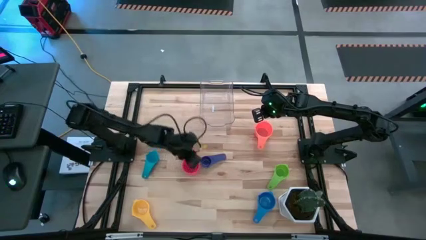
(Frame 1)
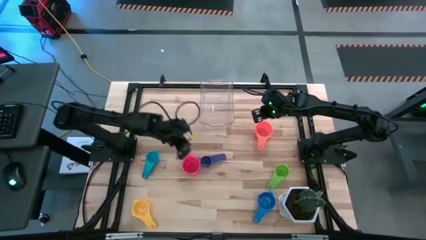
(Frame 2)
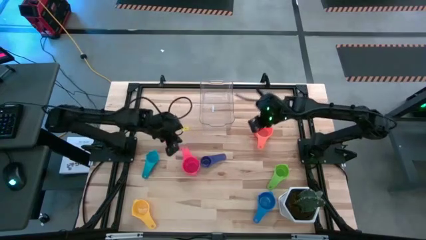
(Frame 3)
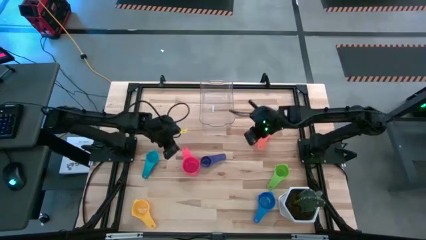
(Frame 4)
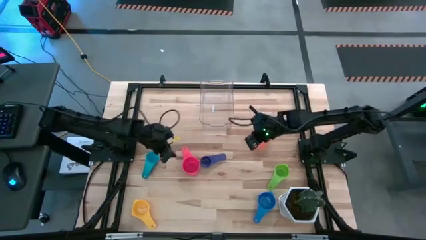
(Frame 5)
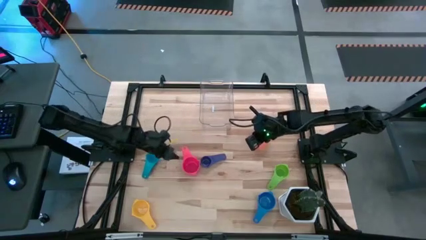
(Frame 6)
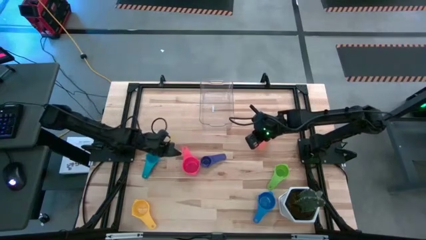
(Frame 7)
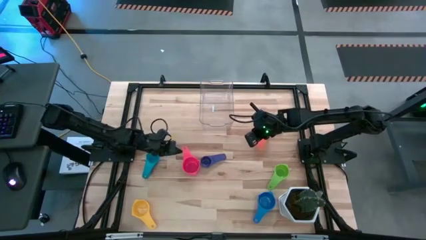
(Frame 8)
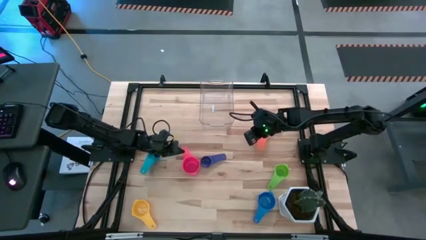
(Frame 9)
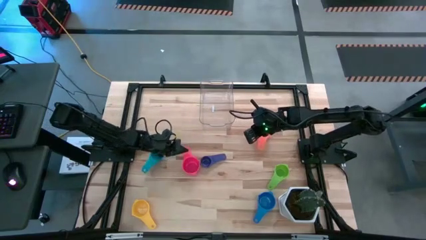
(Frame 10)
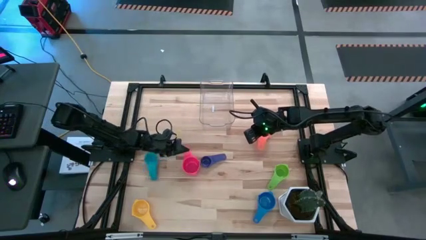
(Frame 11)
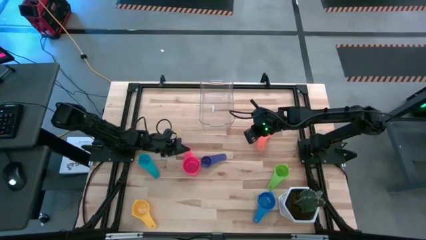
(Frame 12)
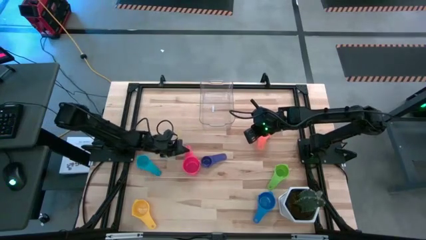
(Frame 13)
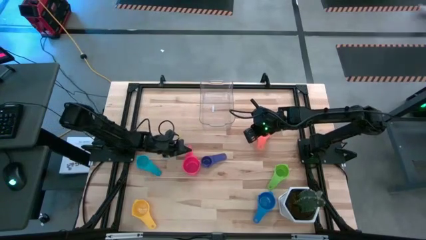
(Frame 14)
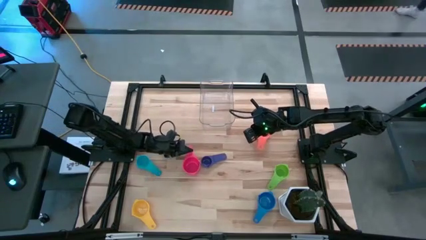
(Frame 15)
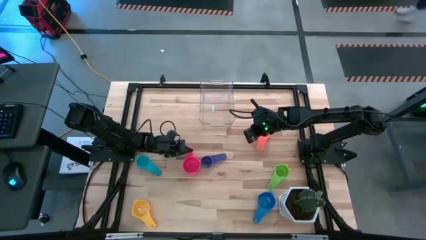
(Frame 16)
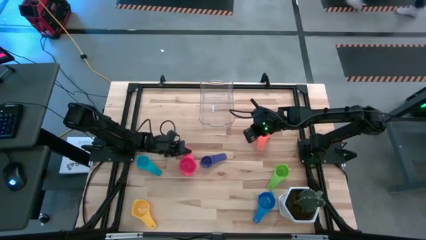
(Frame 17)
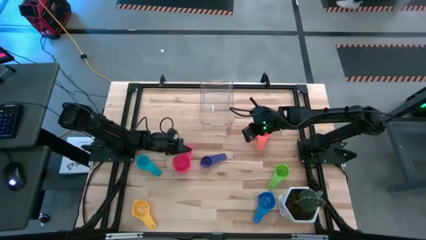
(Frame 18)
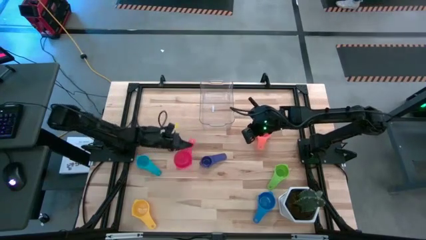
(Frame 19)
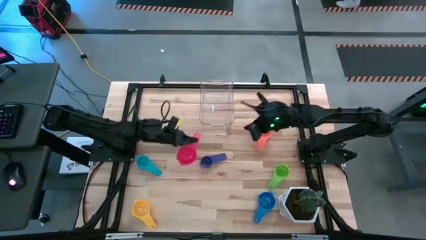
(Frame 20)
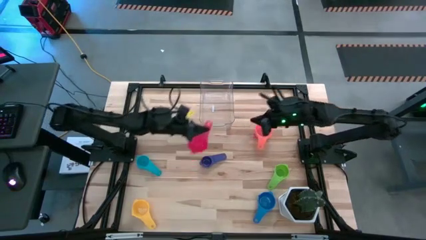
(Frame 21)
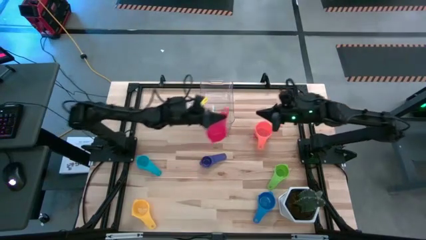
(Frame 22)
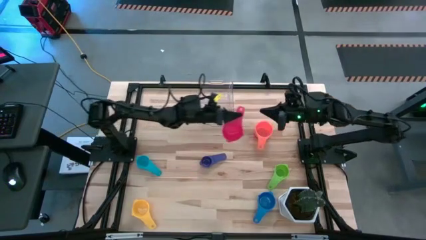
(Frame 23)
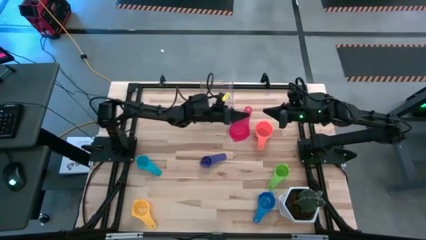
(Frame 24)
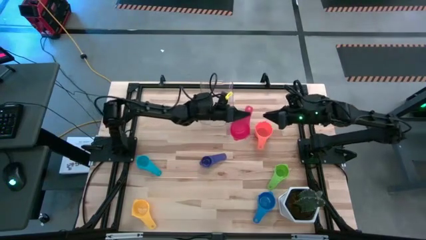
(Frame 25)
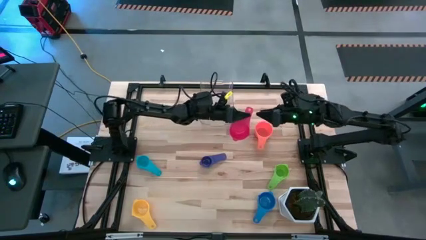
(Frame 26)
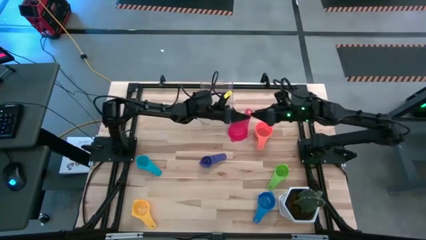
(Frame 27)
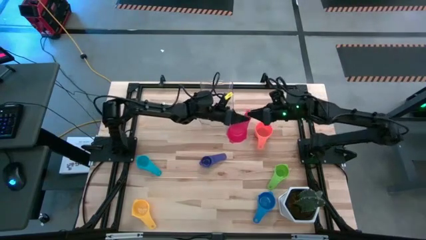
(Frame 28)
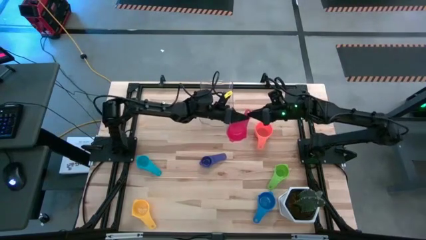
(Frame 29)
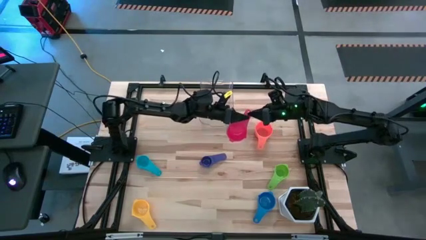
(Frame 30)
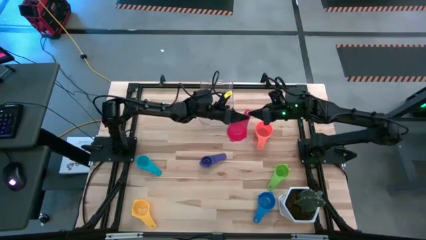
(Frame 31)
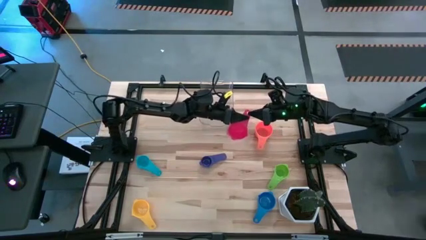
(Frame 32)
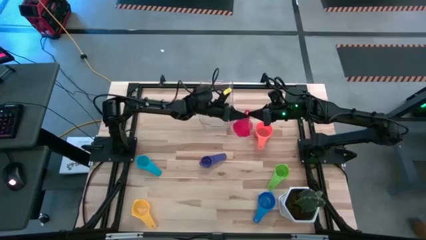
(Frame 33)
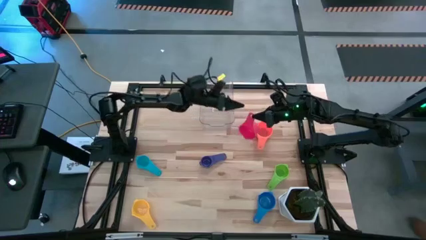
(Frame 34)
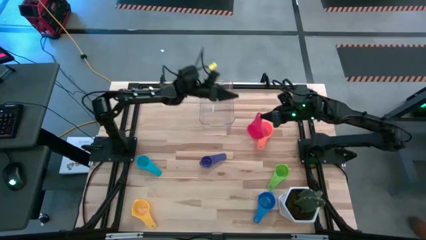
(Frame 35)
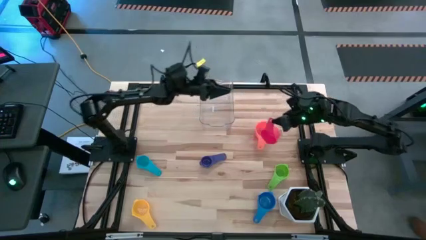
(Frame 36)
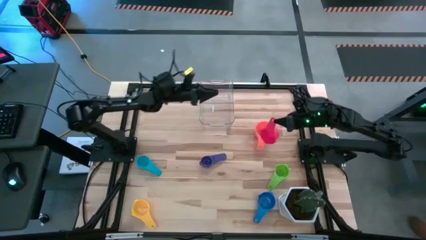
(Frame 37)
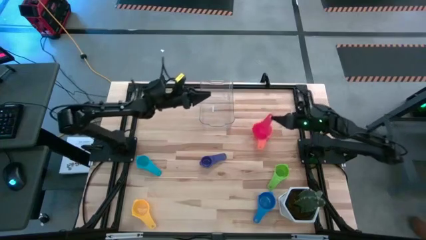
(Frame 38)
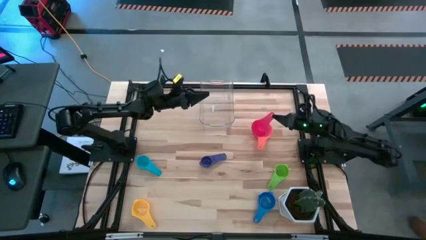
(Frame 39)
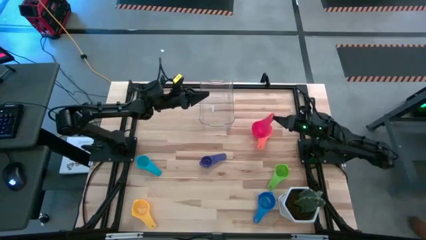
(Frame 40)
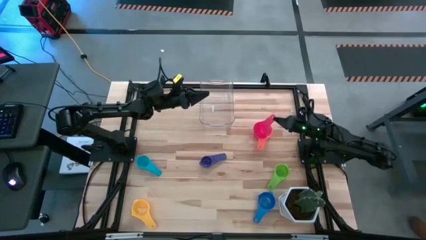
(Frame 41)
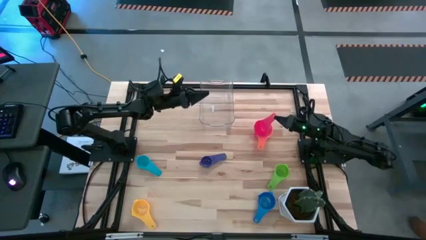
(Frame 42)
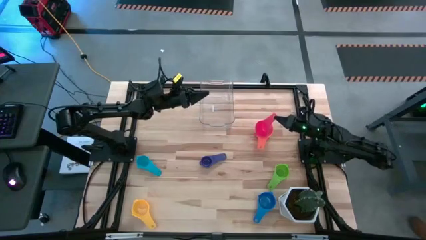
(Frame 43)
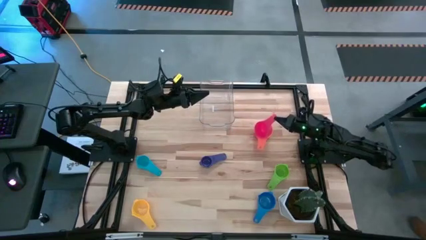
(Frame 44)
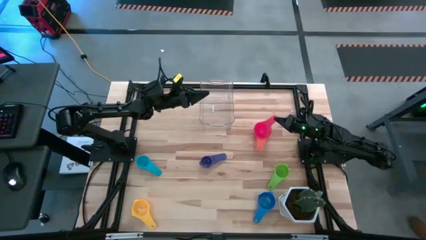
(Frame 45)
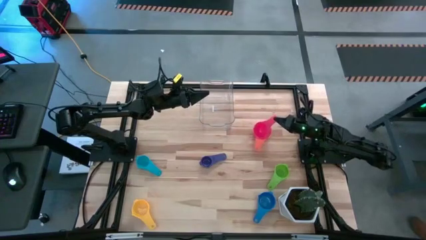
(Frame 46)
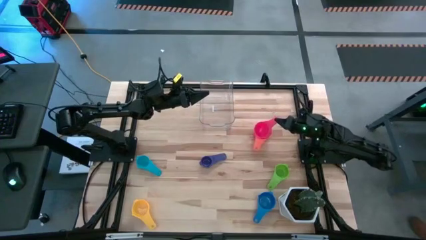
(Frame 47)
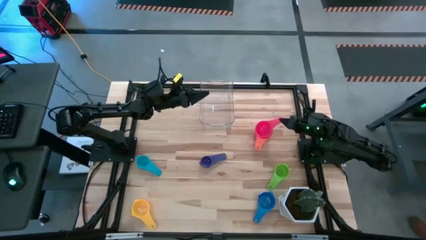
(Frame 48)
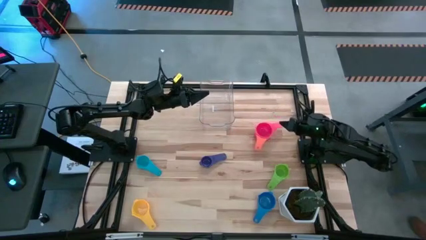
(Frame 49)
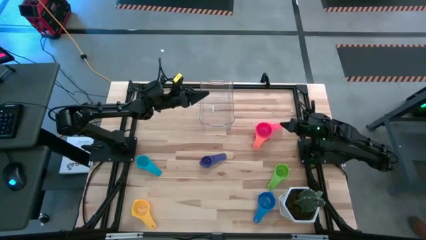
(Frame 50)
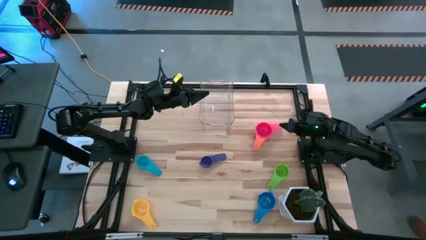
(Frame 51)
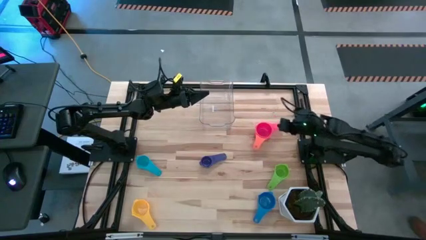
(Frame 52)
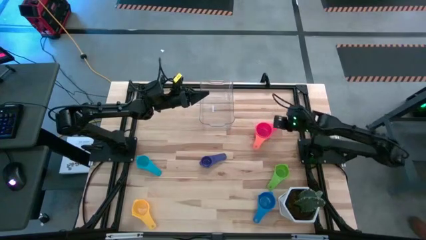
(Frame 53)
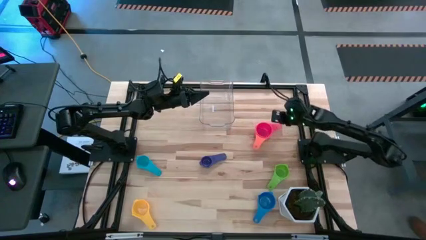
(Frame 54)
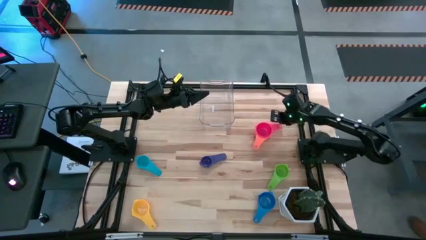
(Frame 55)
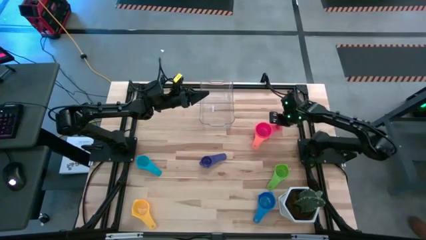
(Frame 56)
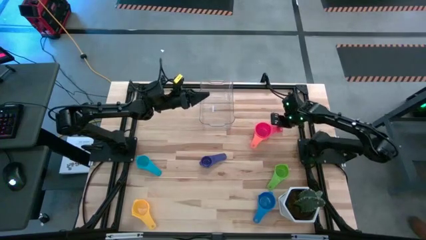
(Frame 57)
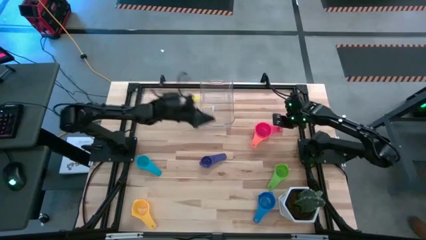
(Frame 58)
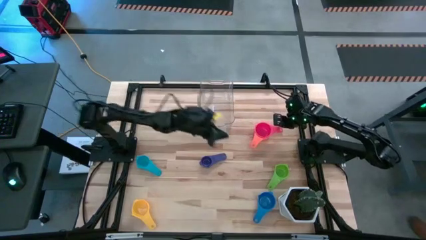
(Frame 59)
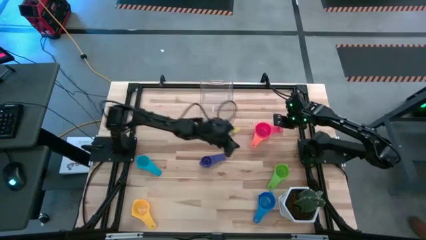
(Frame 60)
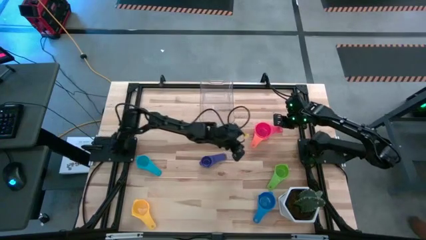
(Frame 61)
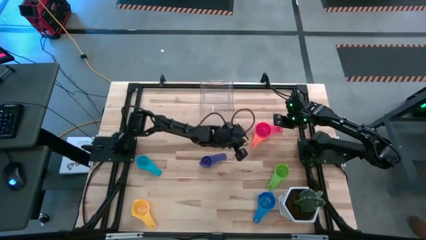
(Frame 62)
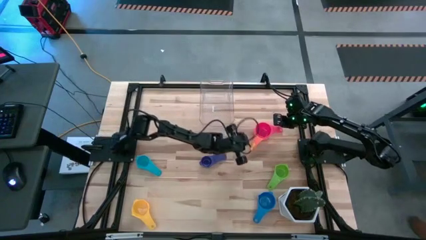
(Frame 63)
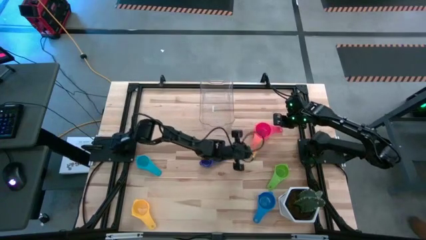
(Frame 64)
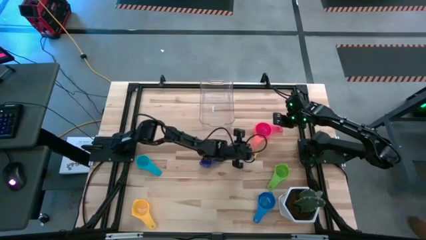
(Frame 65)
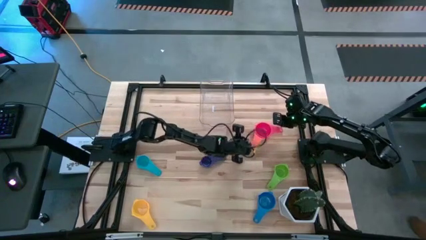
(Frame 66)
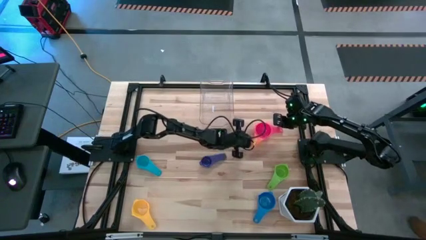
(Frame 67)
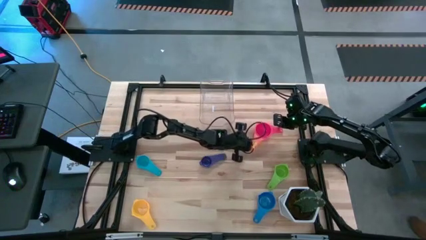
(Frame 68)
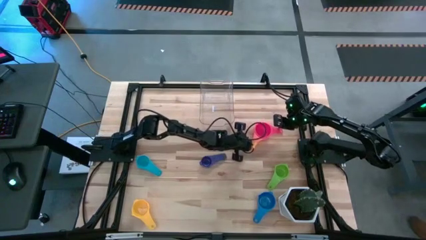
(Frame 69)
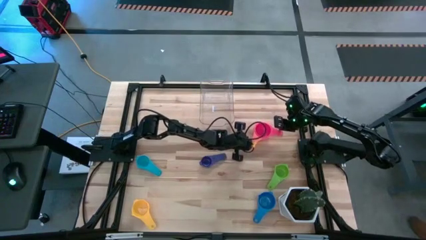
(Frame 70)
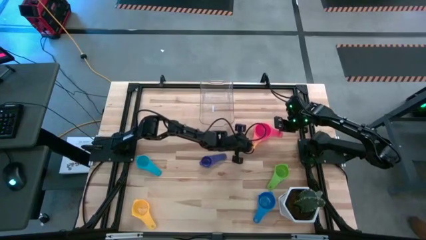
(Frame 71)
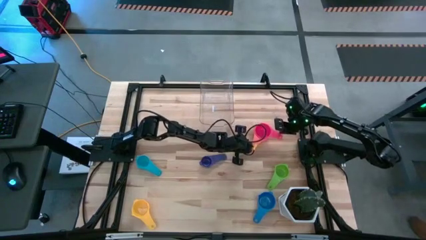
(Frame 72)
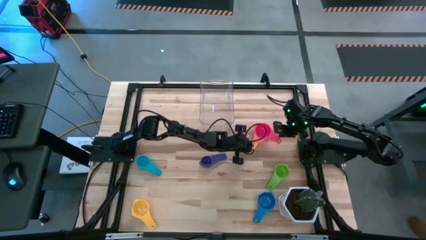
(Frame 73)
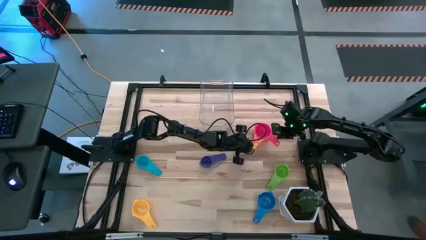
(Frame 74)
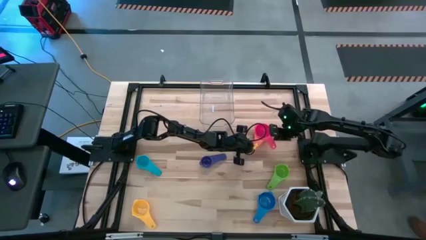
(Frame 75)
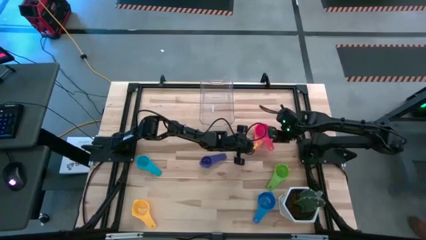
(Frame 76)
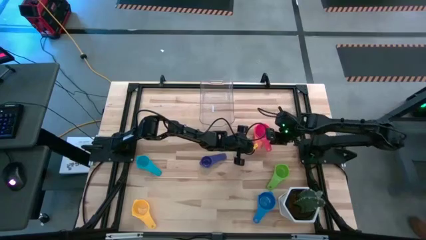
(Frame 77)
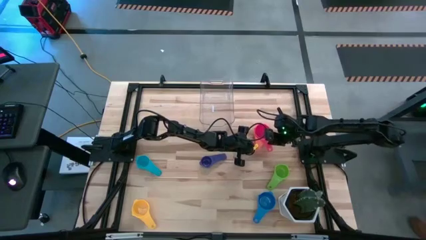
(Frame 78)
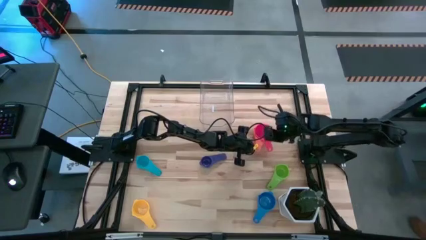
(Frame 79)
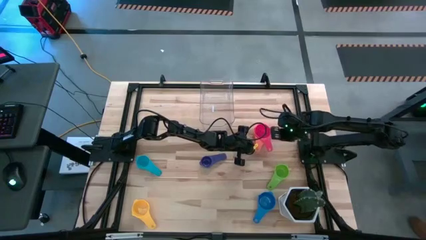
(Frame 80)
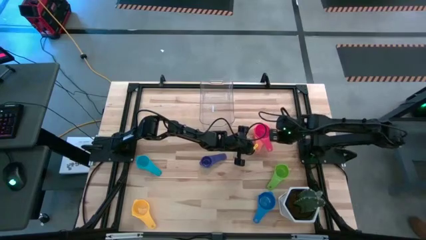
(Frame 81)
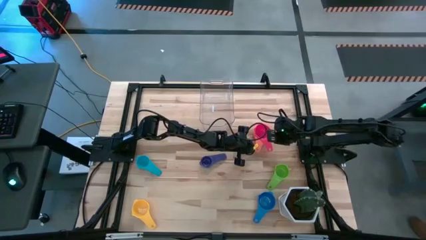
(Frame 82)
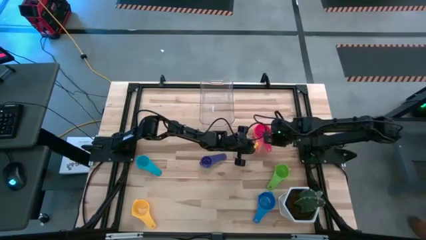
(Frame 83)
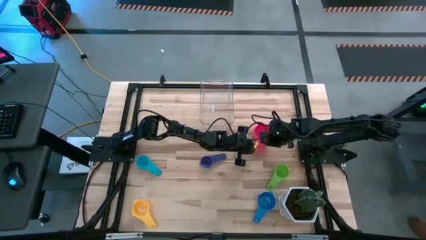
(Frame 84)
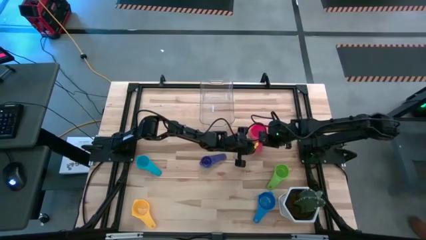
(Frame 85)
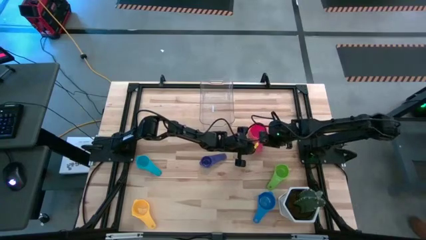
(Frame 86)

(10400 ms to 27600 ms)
Task: Nest measuring cups in basket
Stack the pink measuring cup on top of the orange measuring cup
